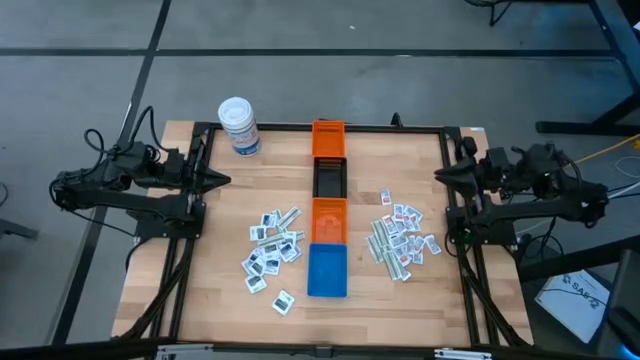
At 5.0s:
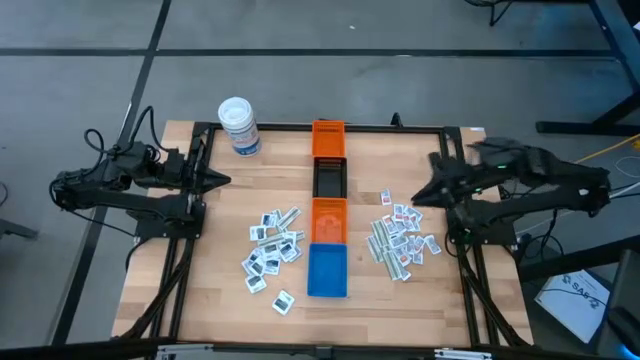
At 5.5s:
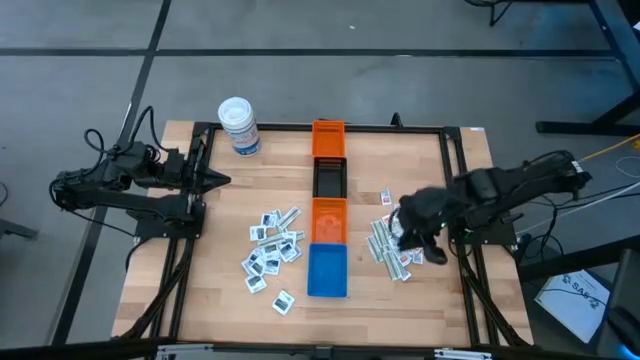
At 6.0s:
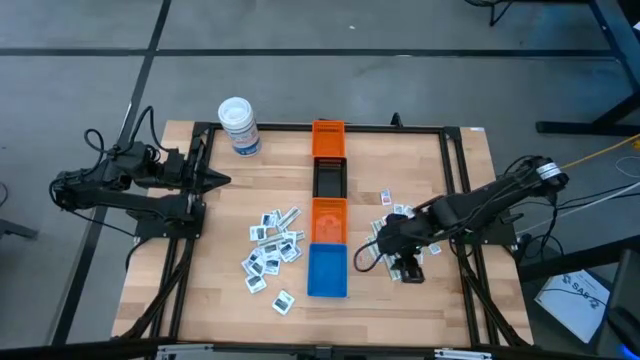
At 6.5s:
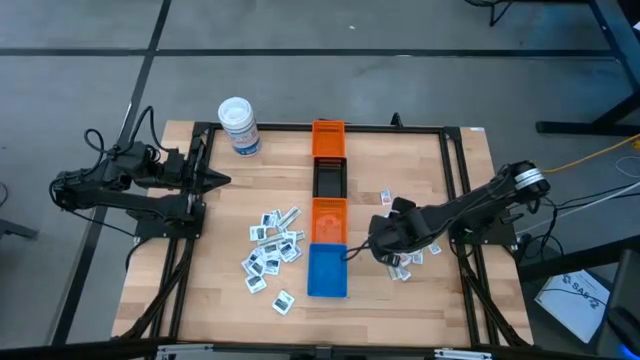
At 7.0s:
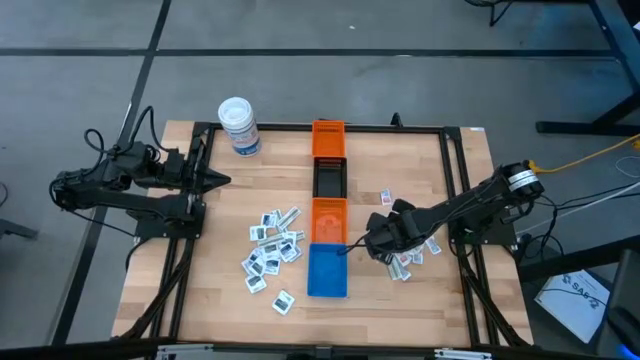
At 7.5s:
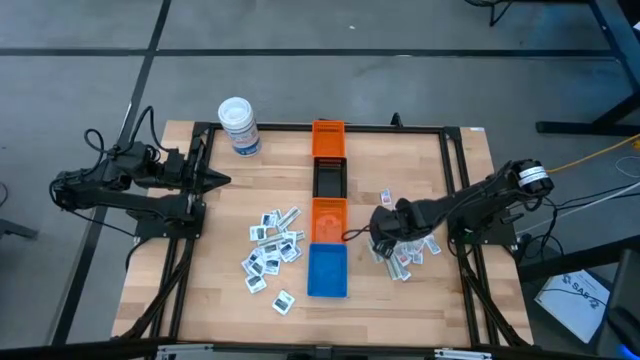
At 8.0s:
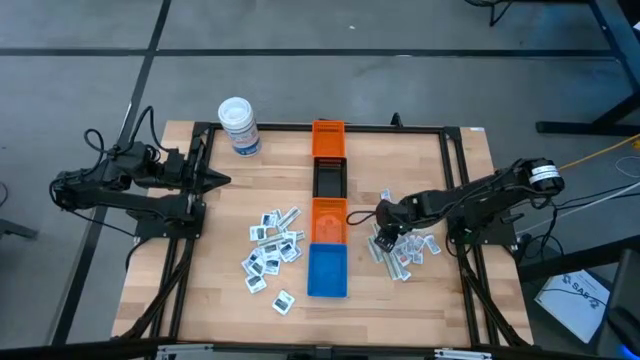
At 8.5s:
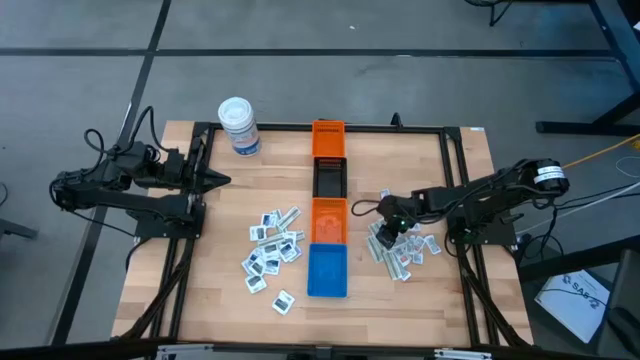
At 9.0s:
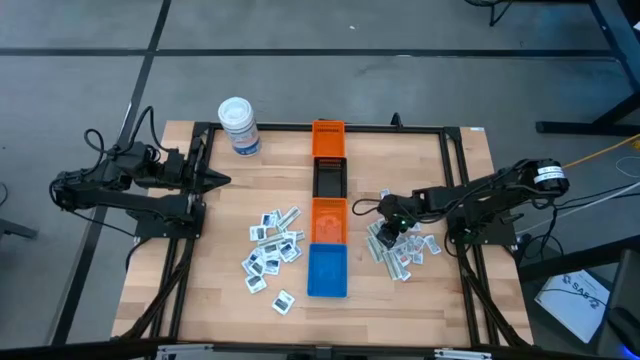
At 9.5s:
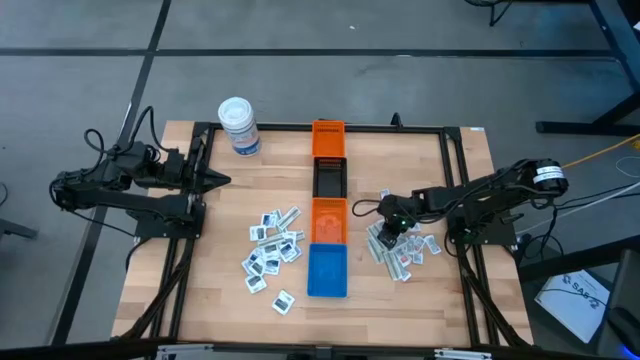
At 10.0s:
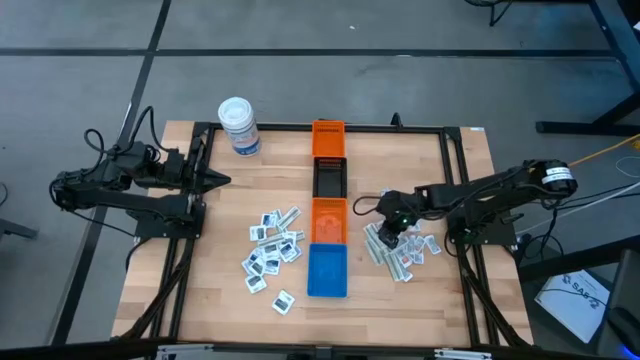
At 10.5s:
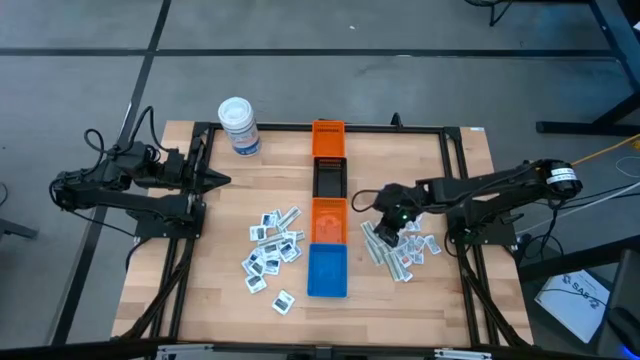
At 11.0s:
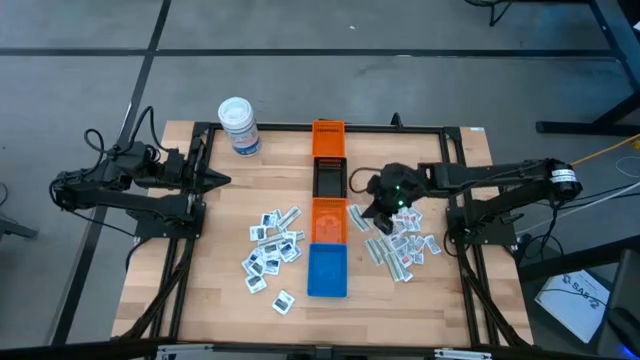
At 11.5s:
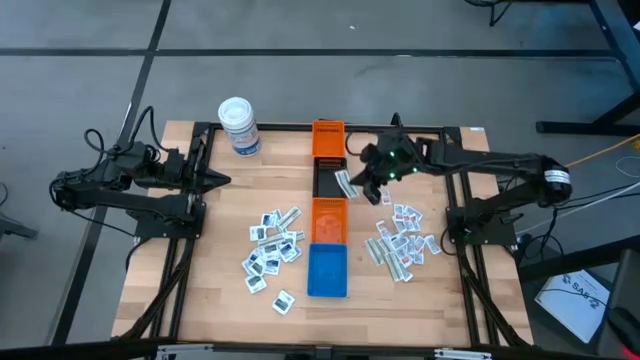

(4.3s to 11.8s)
Task: Pick & Place First Aid Supplies
Put the green bandage into the black bin

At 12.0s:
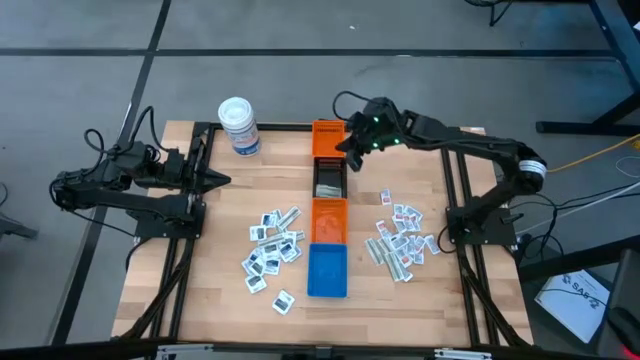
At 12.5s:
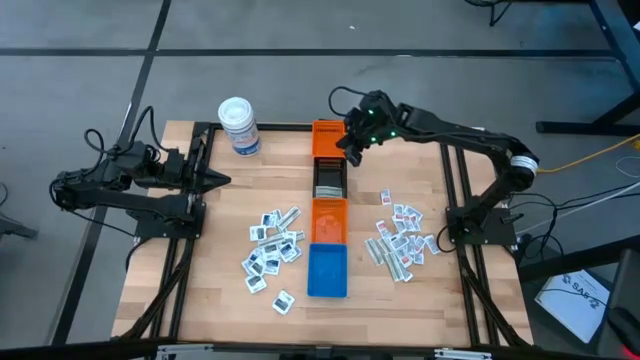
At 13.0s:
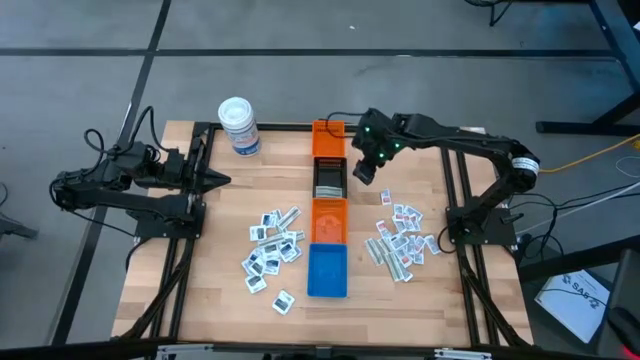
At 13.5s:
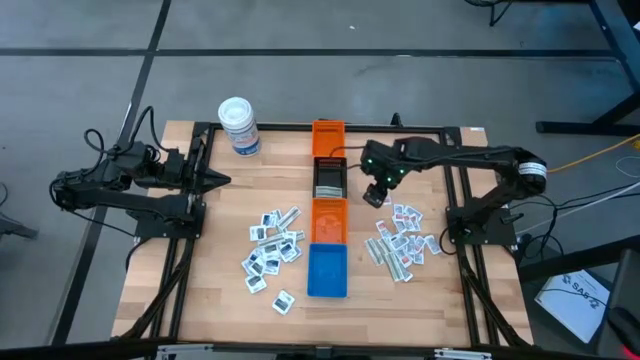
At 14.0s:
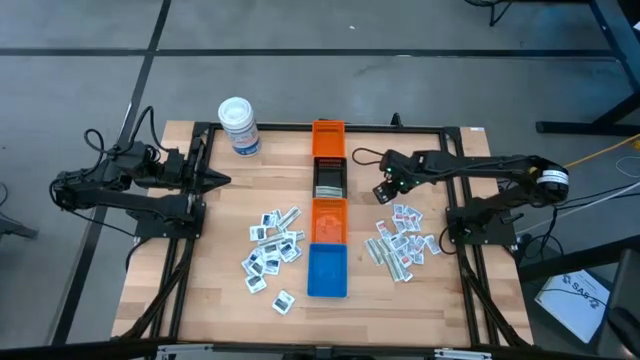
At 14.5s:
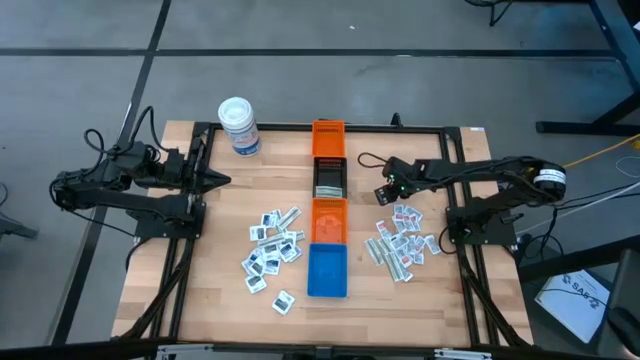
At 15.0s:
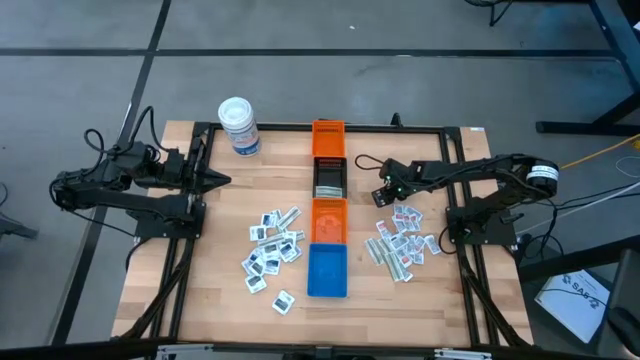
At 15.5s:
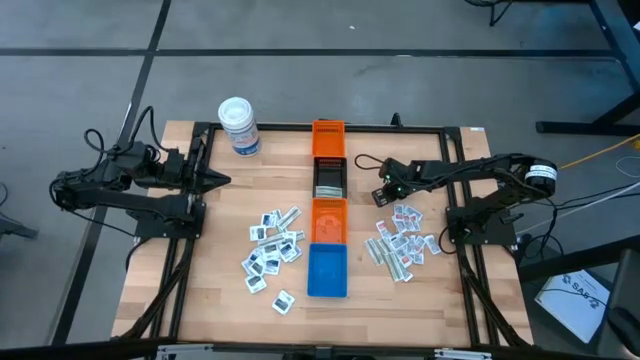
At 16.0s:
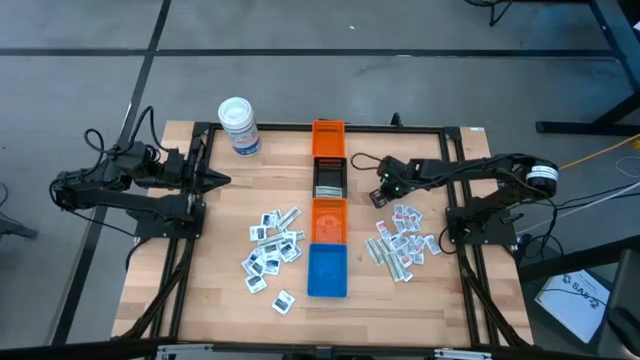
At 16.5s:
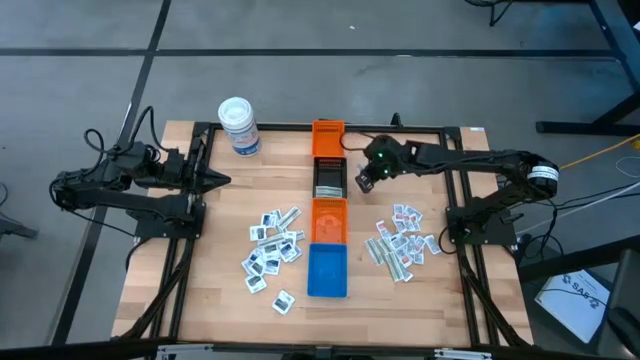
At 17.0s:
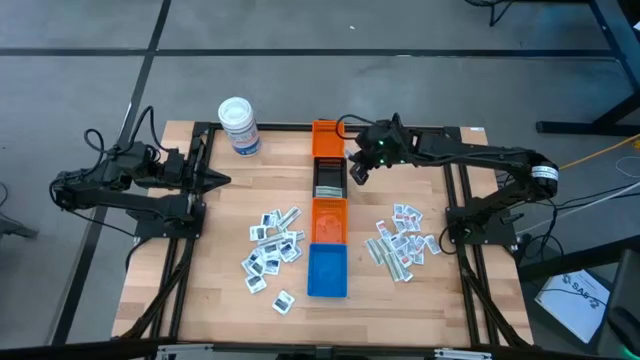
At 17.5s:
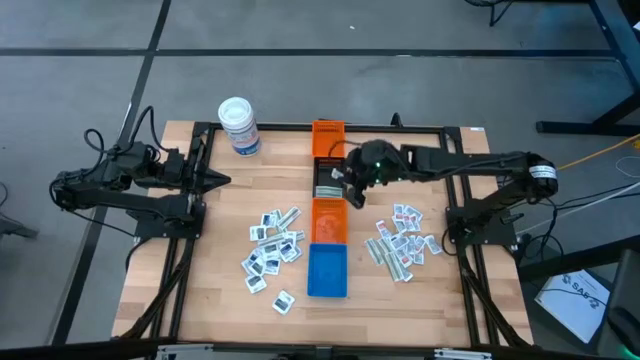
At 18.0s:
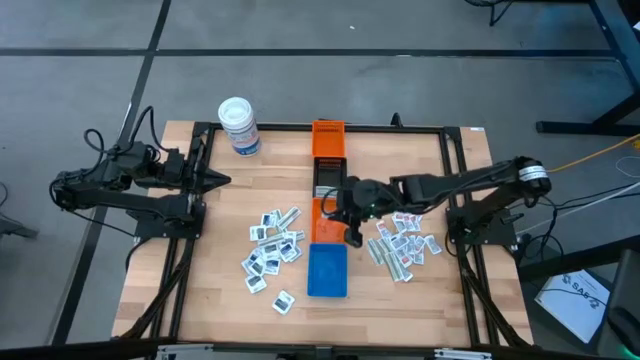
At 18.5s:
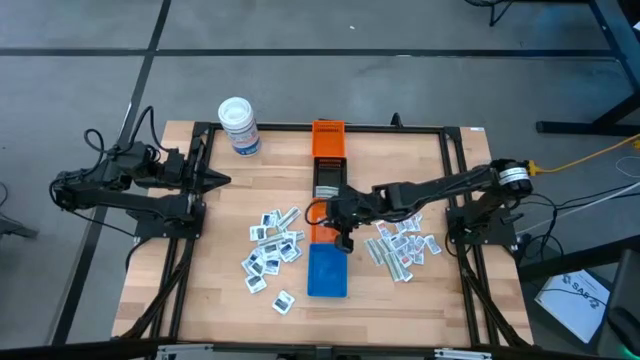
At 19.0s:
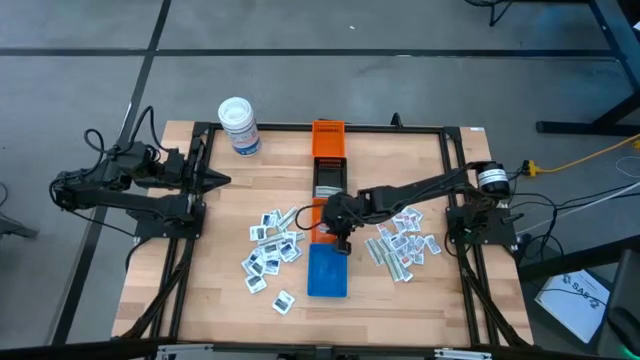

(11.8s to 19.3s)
Put the orange ointment pack into the bottom orange bin

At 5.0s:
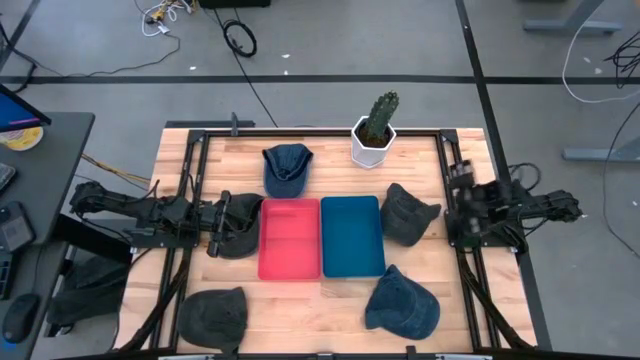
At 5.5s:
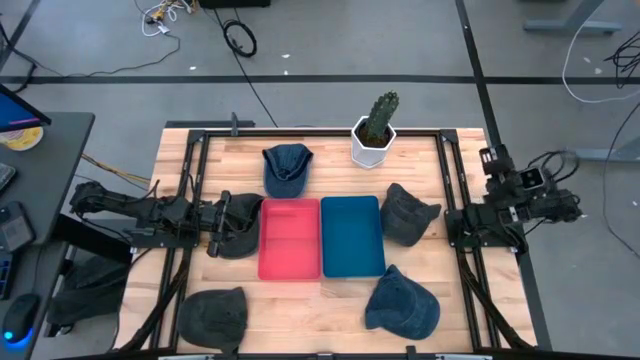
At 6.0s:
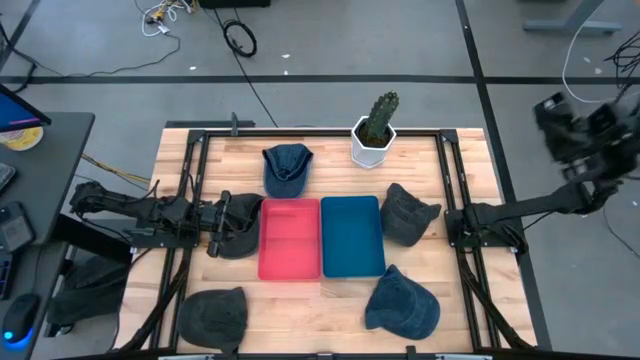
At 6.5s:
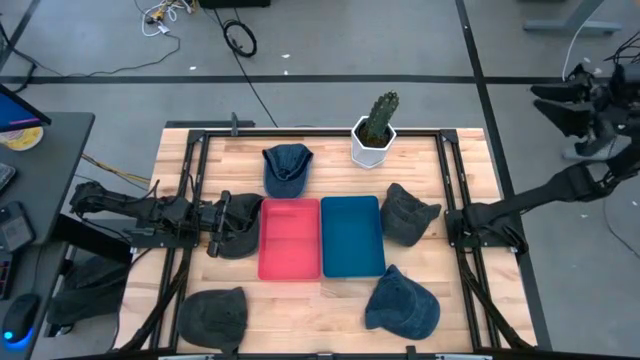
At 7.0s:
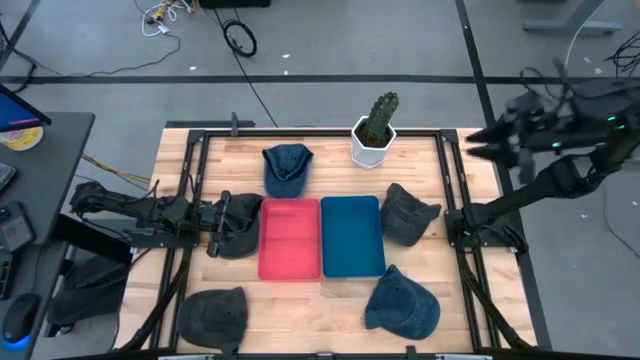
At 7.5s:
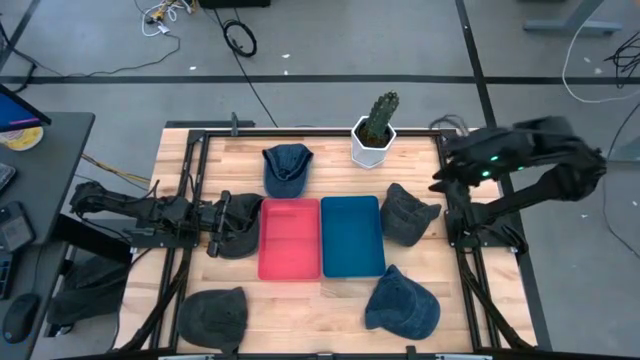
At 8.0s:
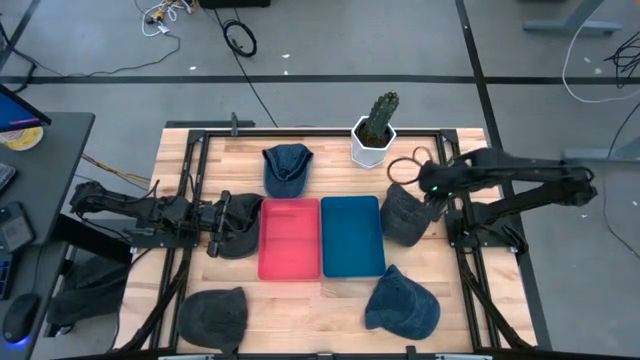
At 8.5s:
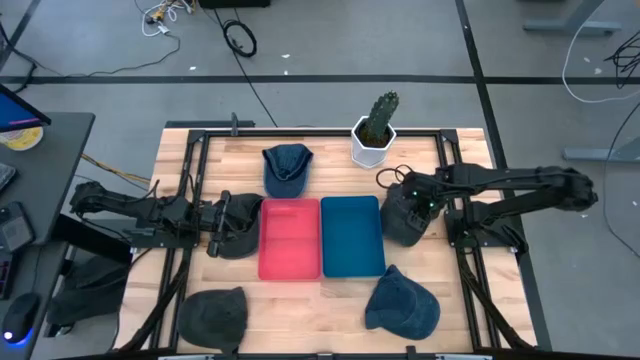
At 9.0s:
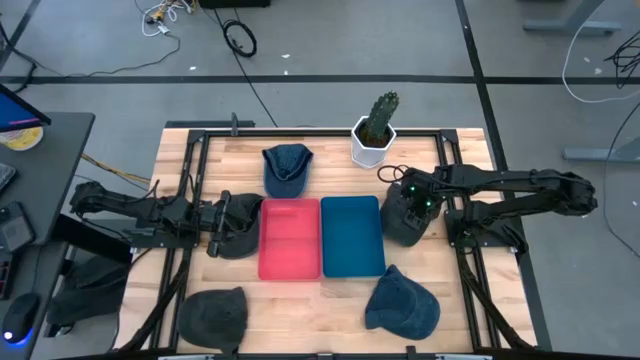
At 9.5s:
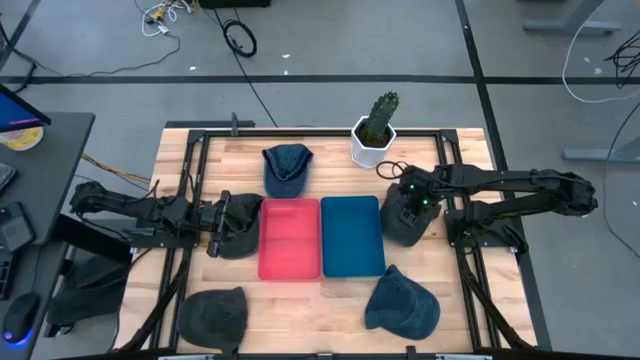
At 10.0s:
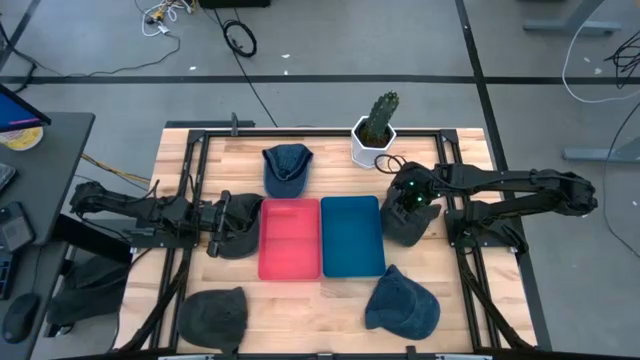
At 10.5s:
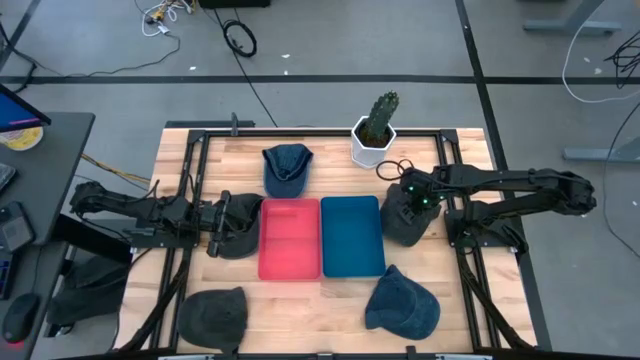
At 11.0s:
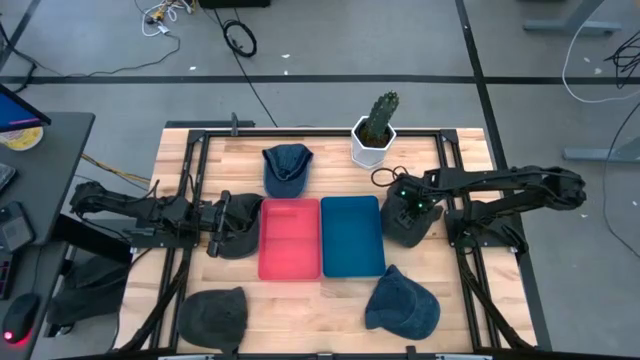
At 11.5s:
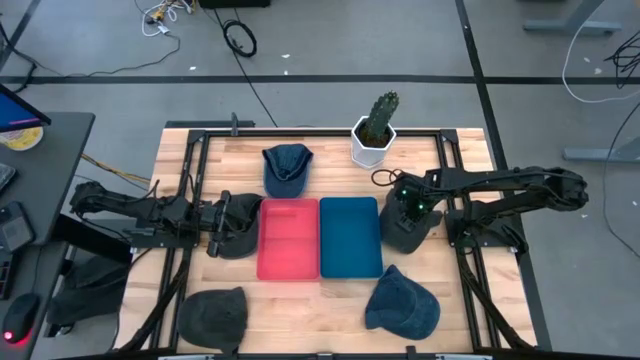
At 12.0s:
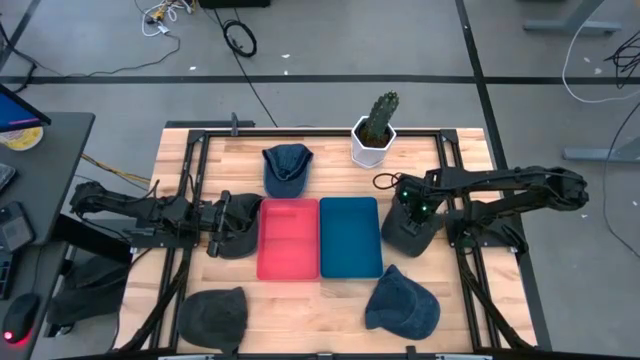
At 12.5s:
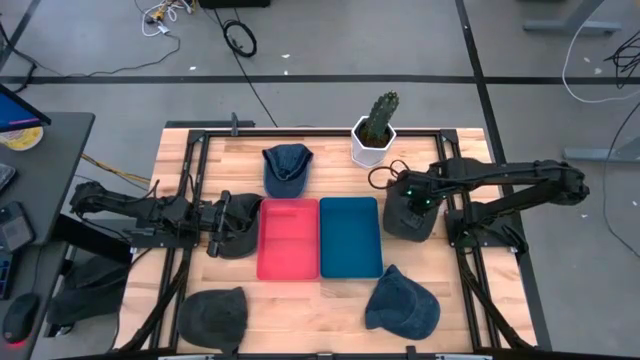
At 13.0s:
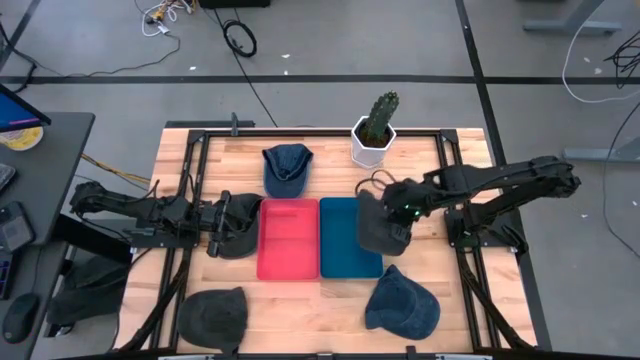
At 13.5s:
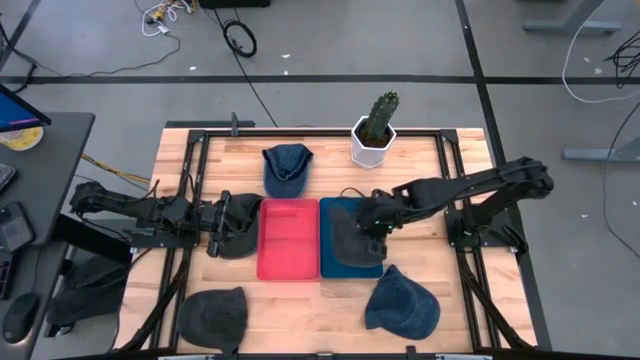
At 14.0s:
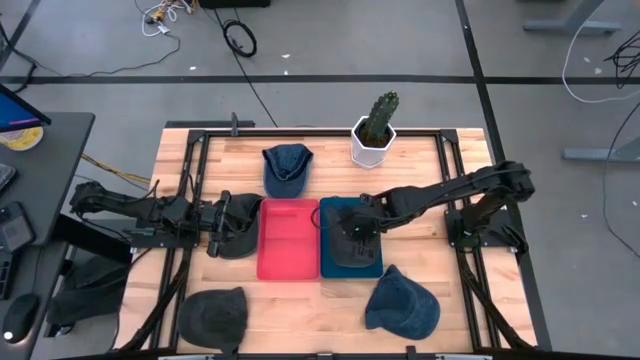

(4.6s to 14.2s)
Task: Pick & Place hat
Put the top right gray cap into the blue bin
